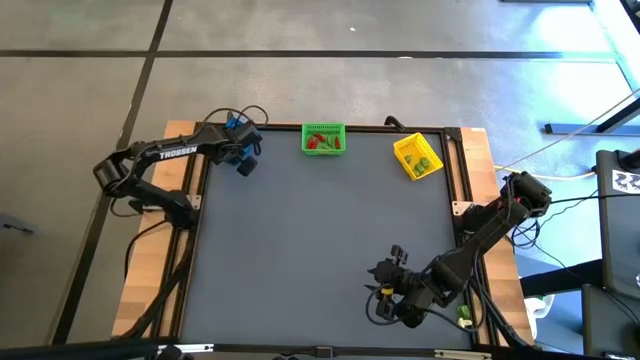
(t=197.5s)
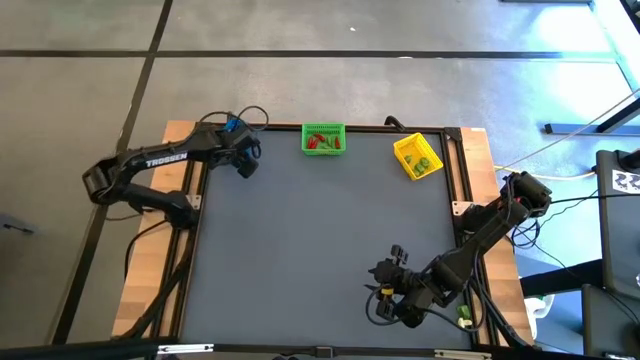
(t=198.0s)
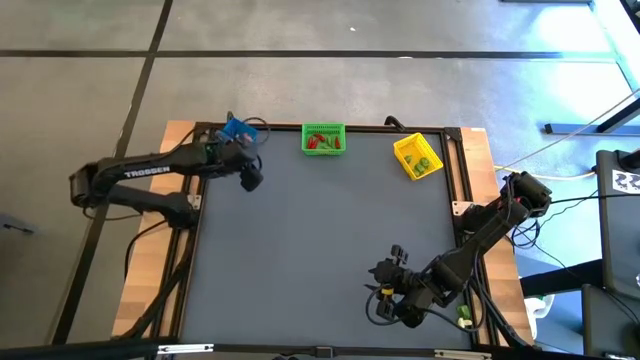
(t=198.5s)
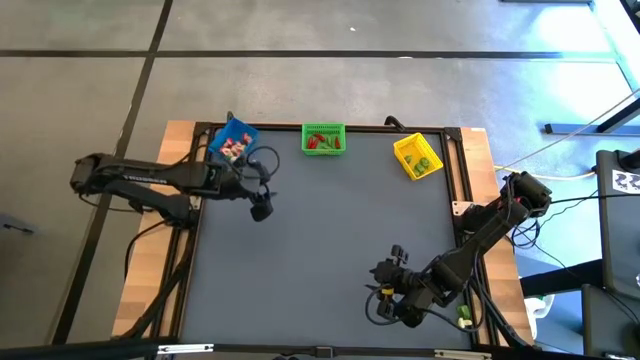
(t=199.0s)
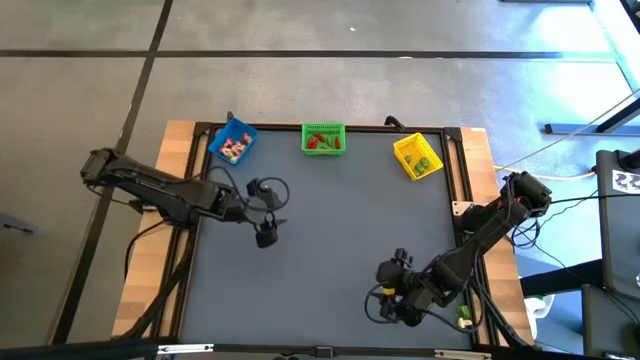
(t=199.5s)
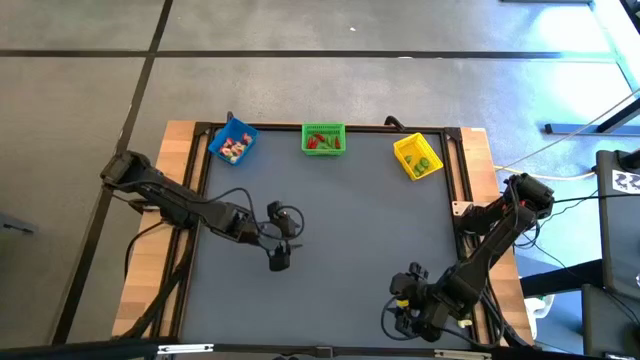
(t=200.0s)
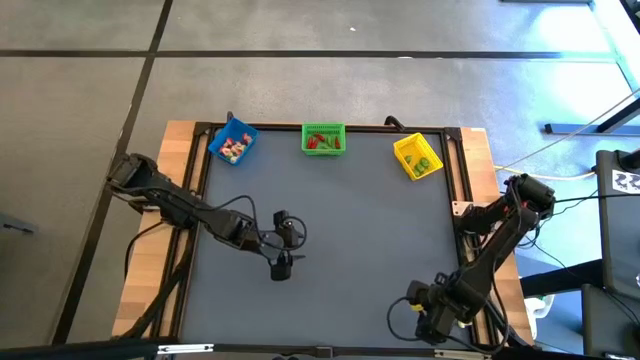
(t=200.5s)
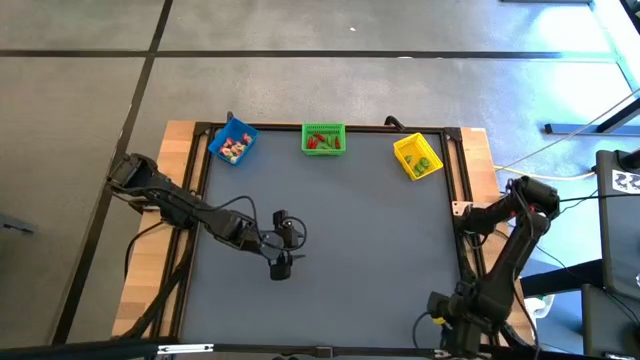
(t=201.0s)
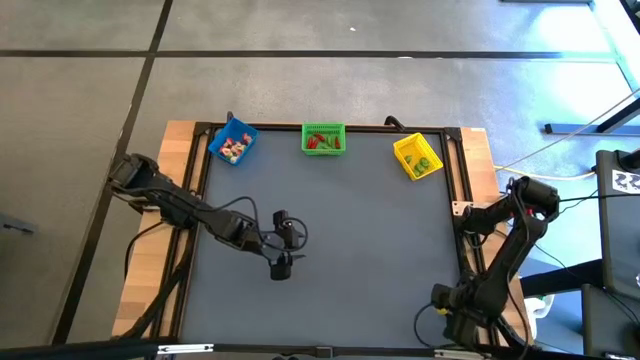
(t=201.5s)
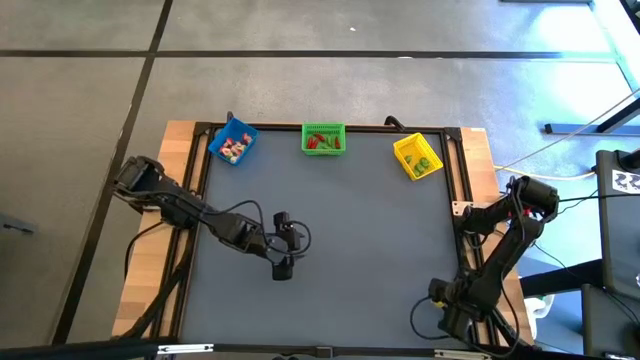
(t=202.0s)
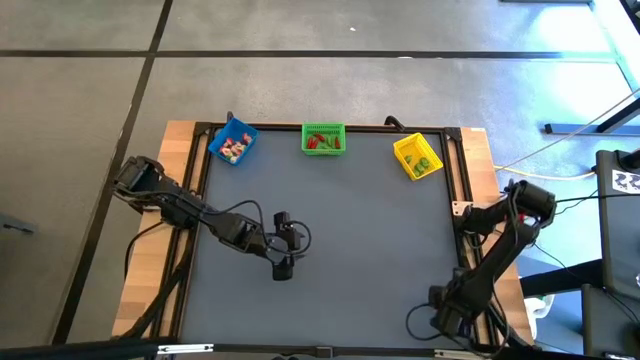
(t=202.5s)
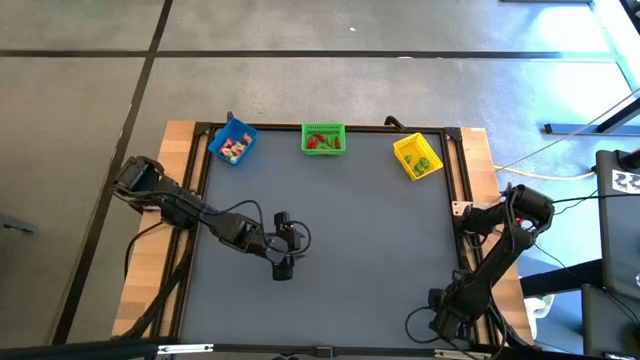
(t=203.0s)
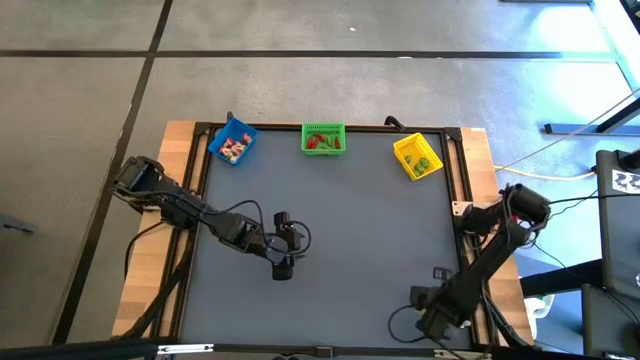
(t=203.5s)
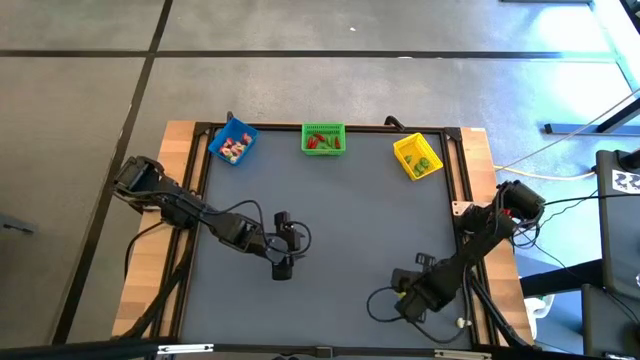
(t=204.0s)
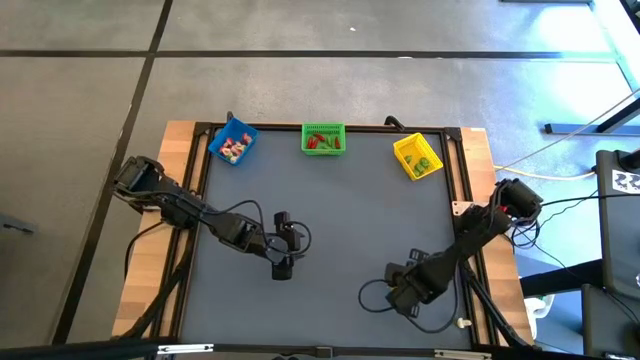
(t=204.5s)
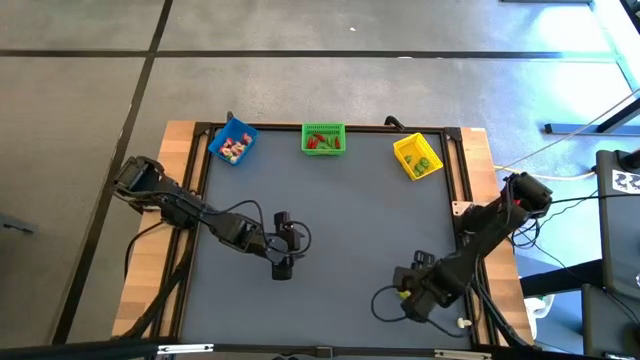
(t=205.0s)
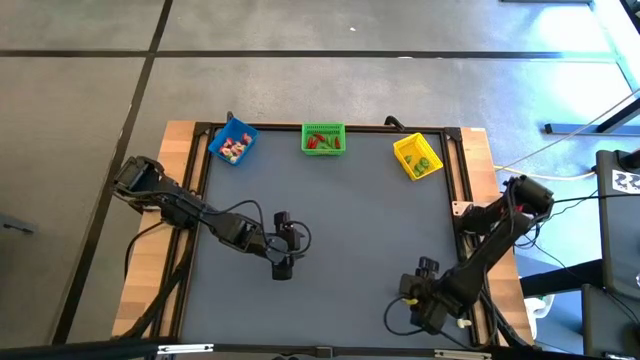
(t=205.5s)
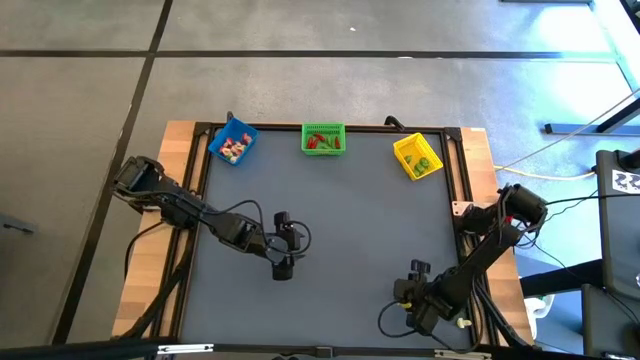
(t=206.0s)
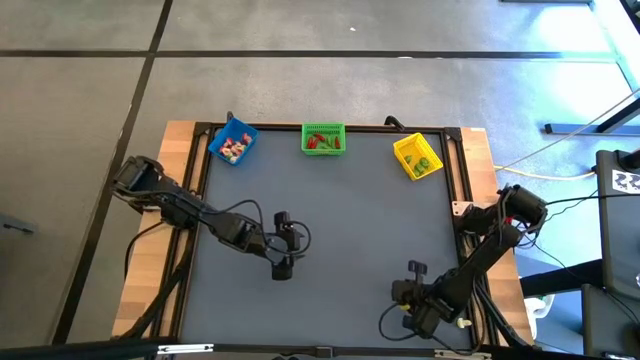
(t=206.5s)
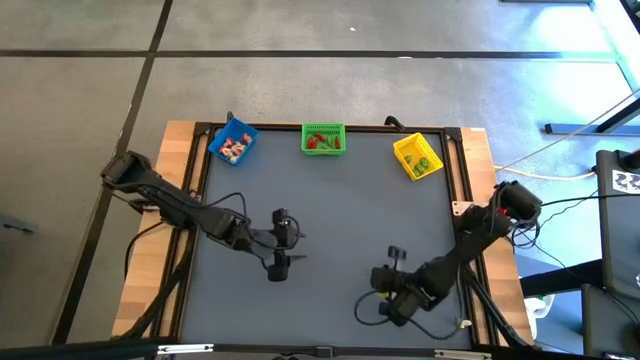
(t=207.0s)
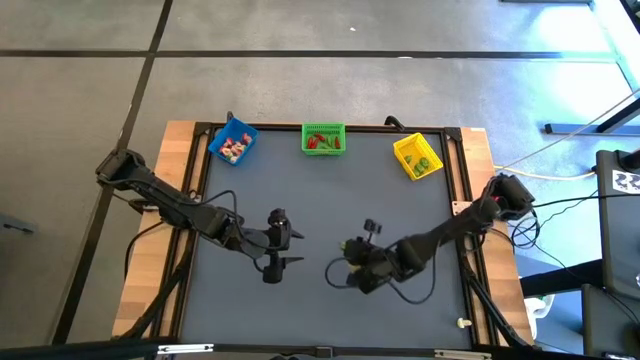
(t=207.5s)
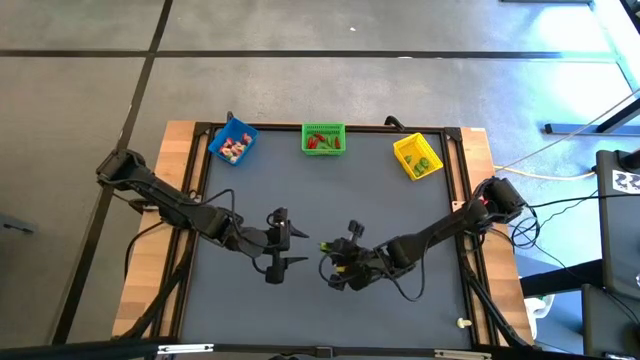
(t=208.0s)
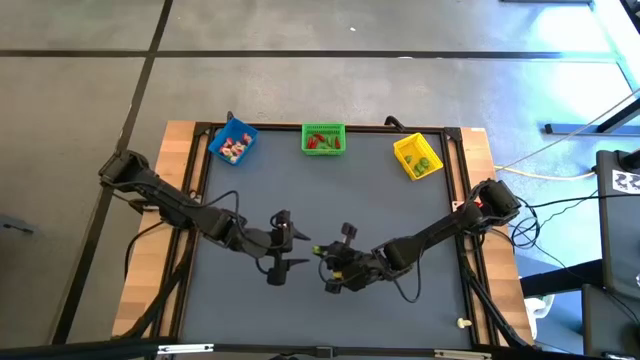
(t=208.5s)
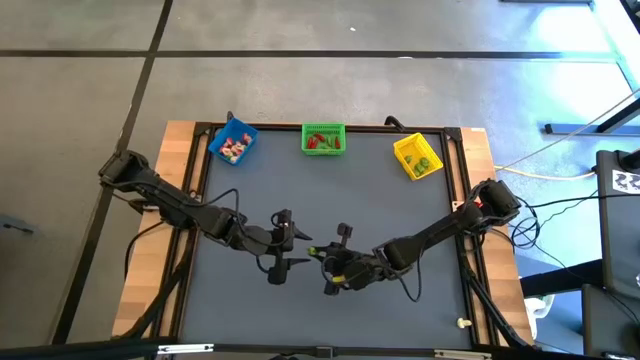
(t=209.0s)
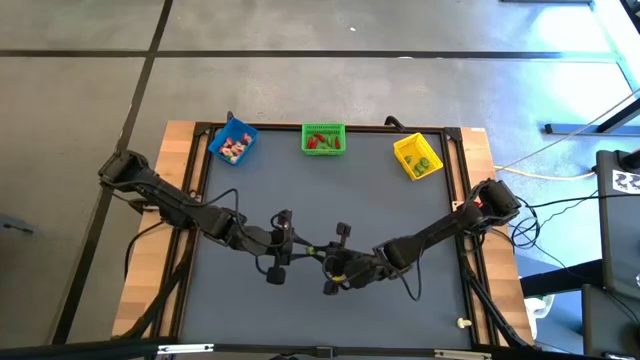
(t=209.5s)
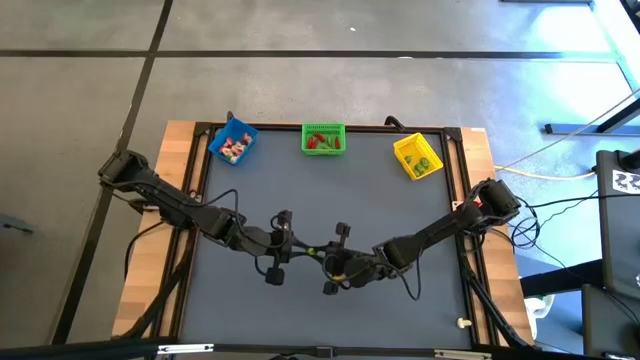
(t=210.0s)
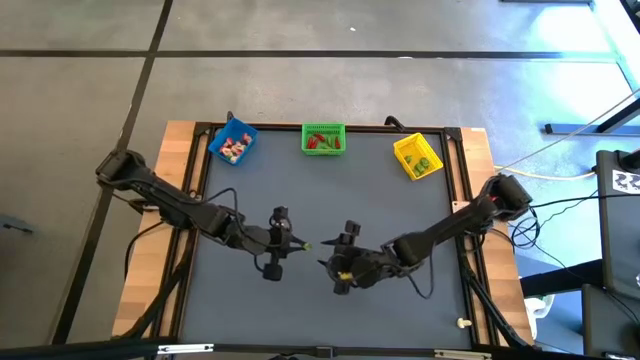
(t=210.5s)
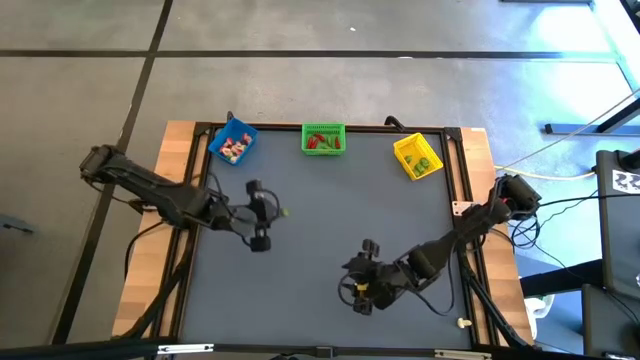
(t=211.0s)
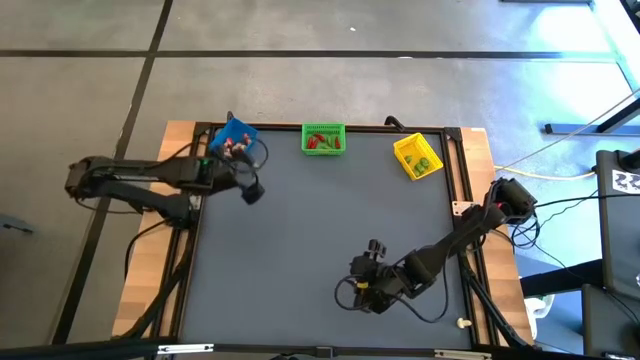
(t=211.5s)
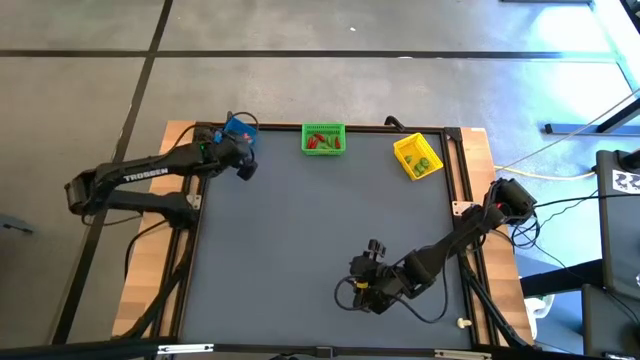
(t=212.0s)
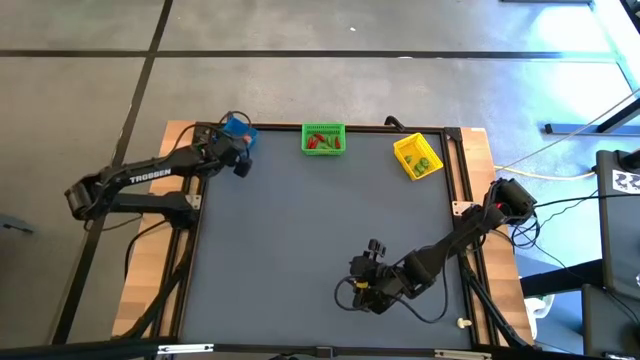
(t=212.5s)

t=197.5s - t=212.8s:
Task: Sort produce into baskets
Put the green chili pepper into the yellow bin

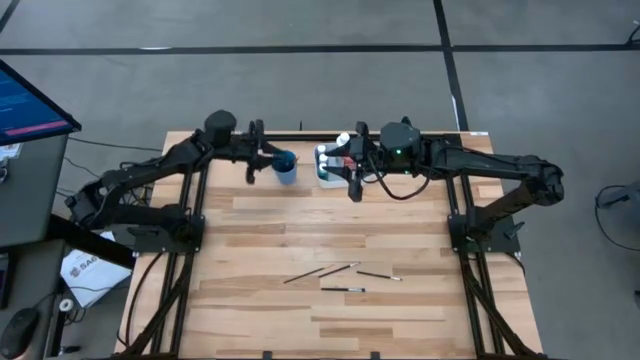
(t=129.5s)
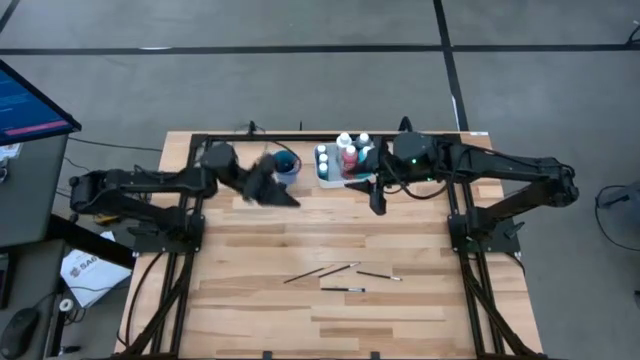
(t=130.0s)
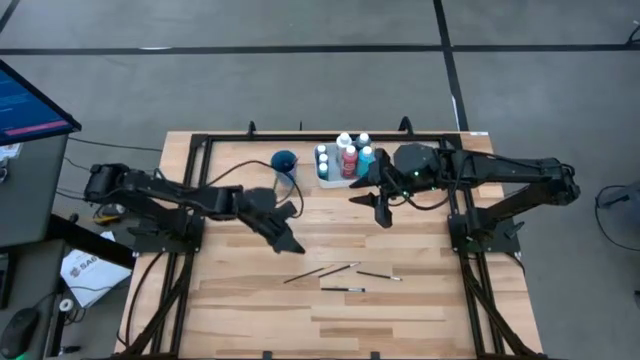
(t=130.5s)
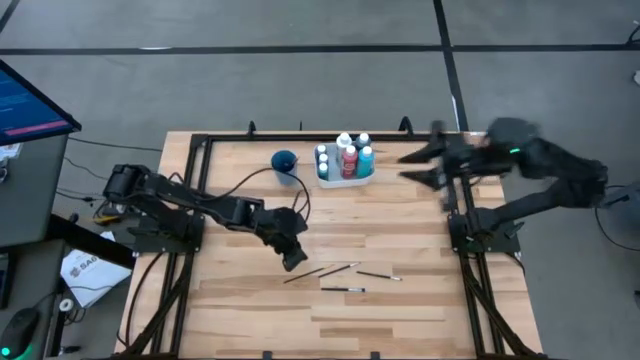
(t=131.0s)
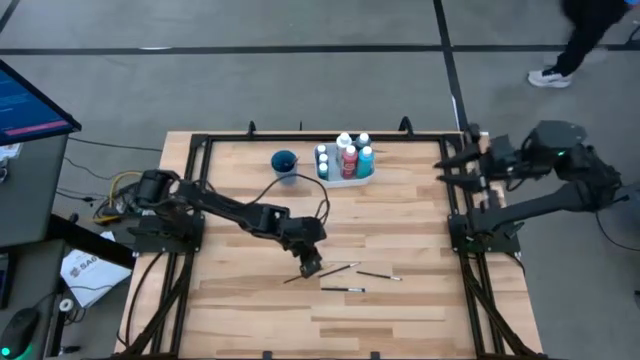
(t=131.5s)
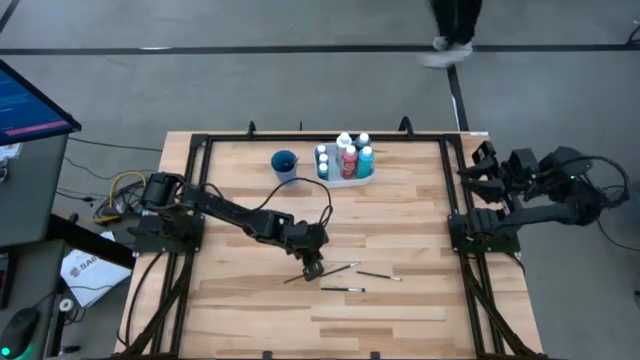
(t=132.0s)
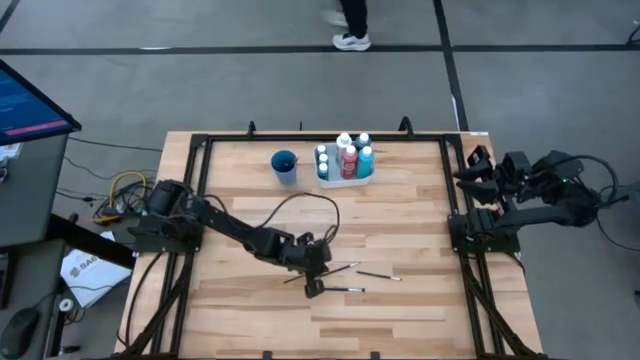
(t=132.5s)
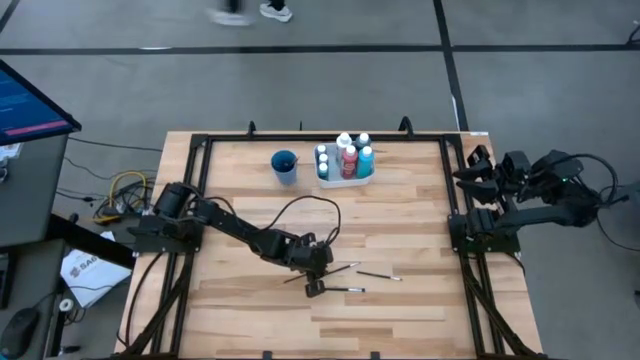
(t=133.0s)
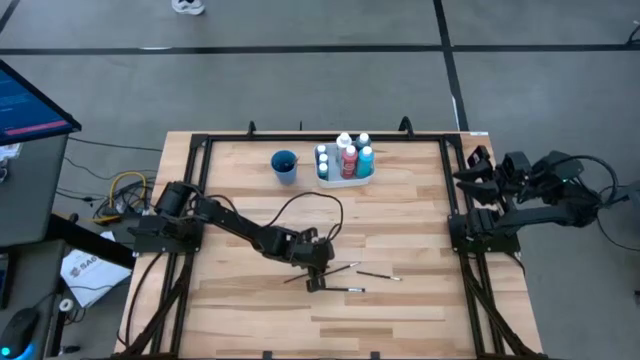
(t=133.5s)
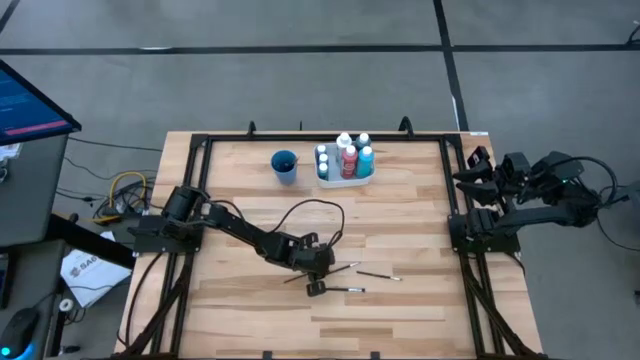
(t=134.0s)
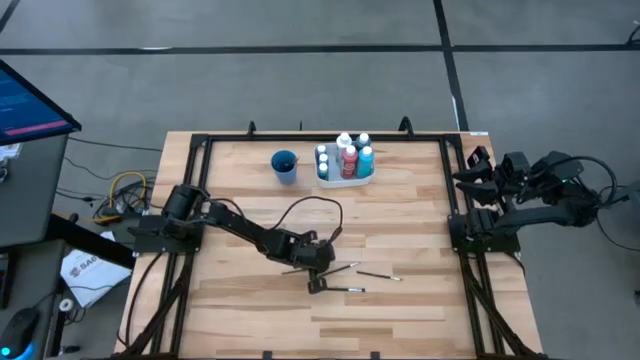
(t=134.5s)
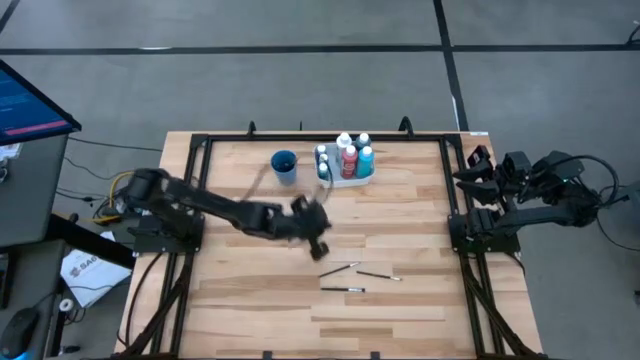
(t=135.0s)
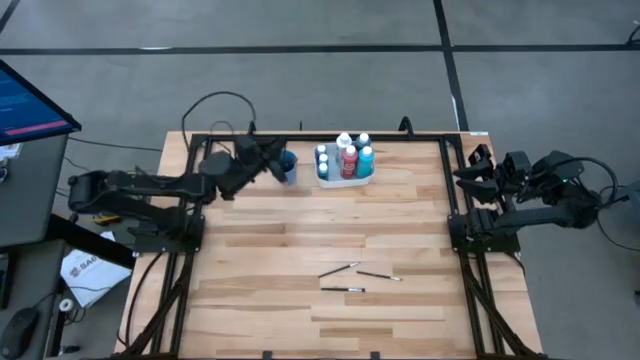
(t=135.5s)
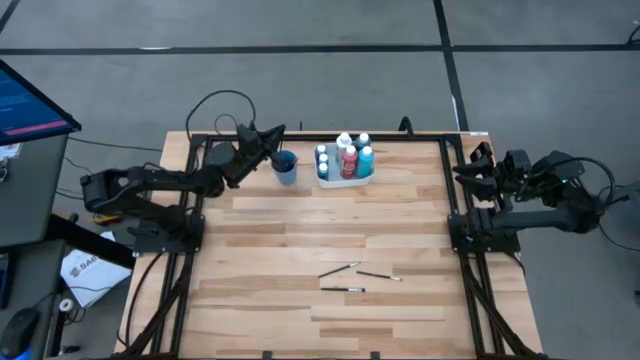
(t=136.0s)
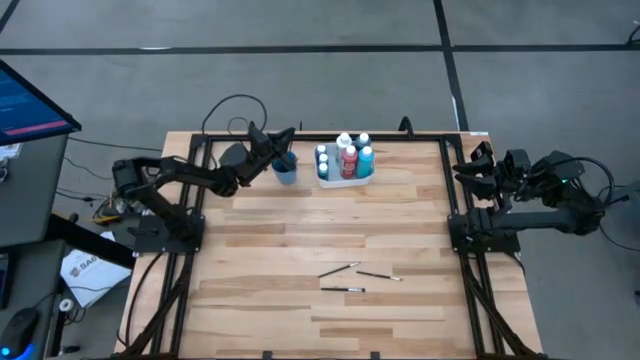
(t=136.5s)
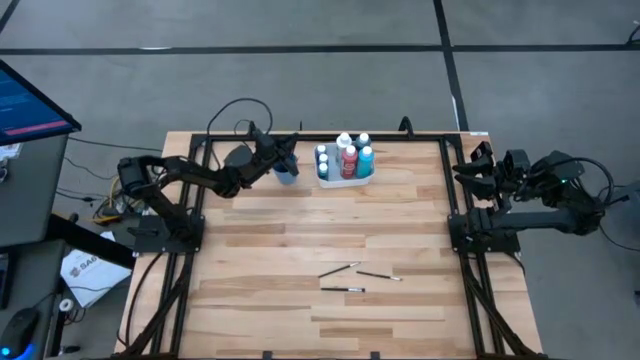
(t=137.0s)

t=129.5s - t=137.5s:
Task: Pick & Place Paint Supplies
Put the gold and black paint brush into the blue cup
